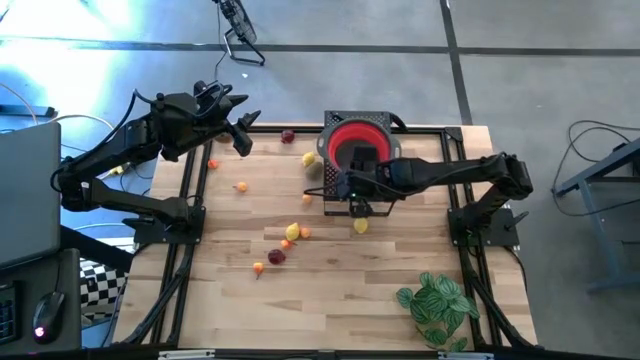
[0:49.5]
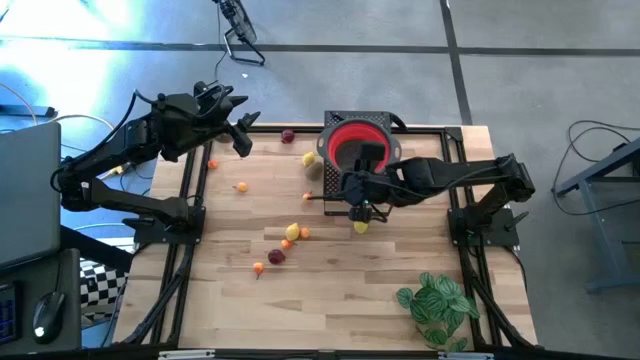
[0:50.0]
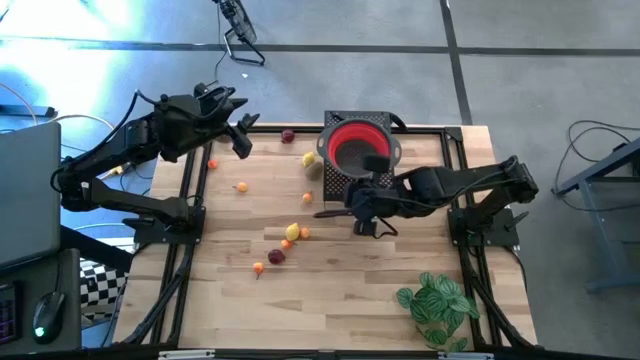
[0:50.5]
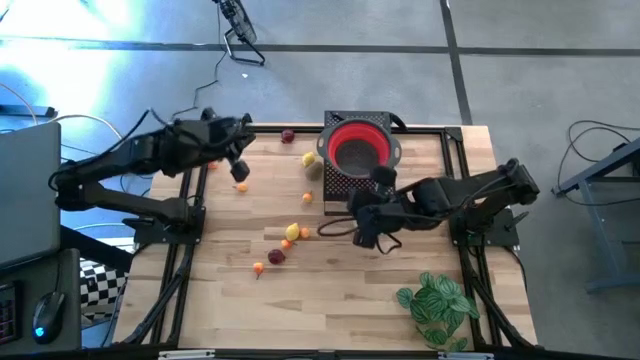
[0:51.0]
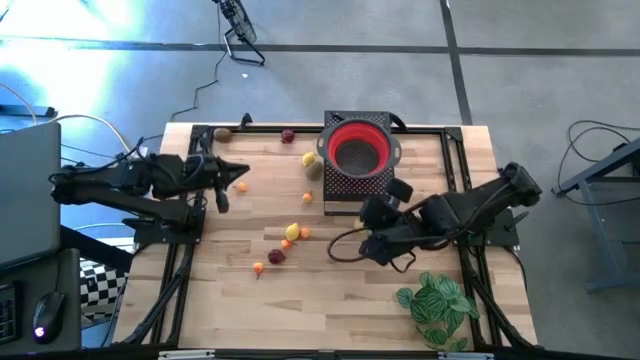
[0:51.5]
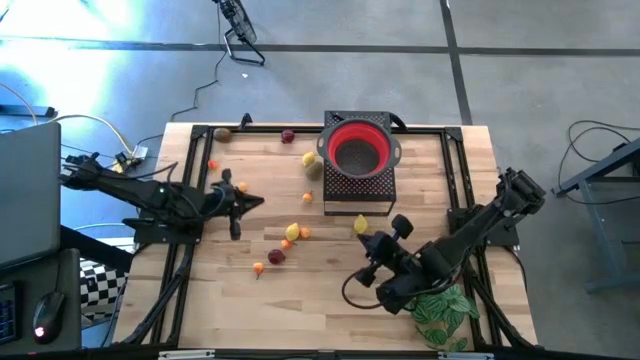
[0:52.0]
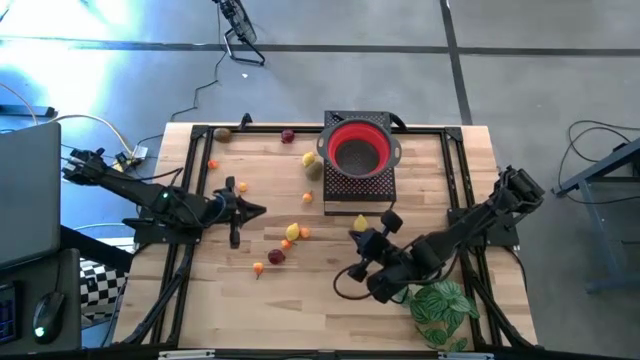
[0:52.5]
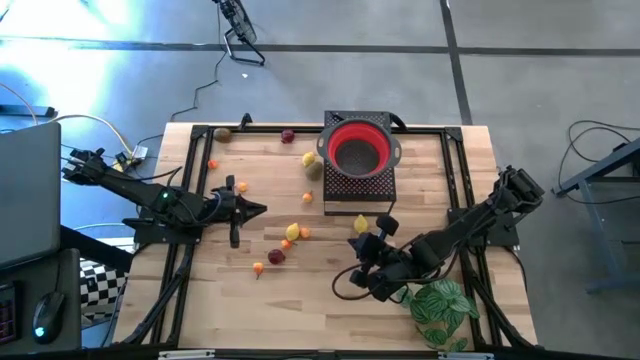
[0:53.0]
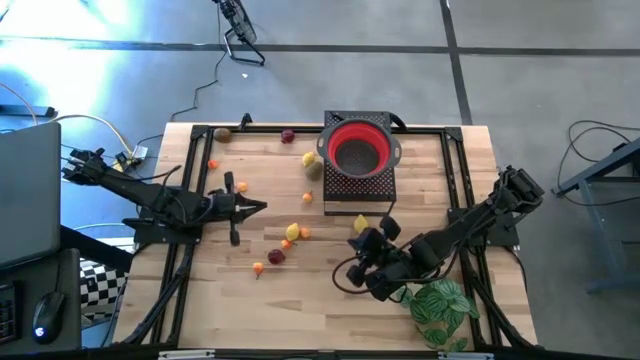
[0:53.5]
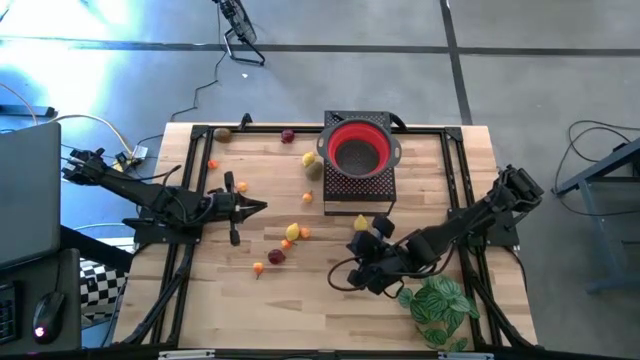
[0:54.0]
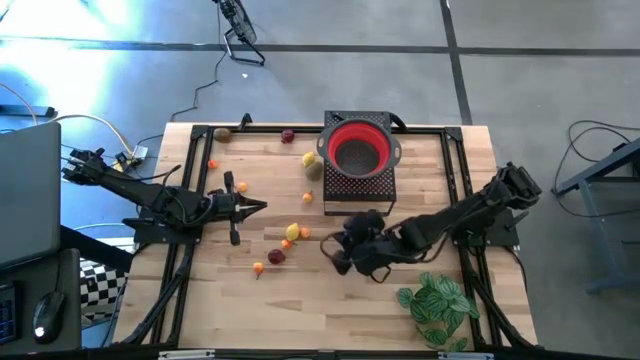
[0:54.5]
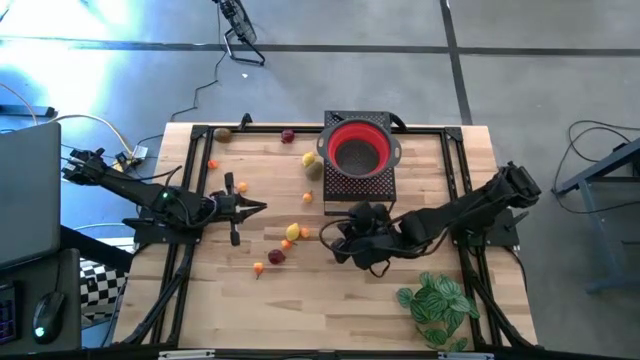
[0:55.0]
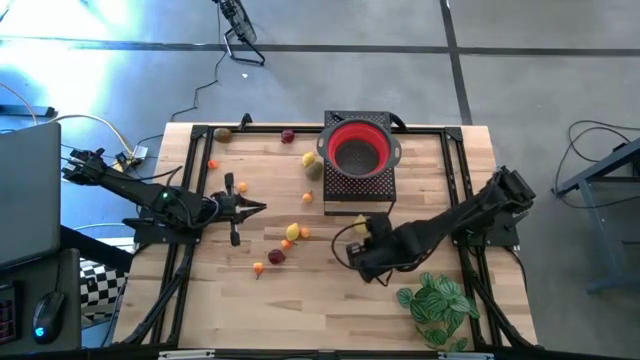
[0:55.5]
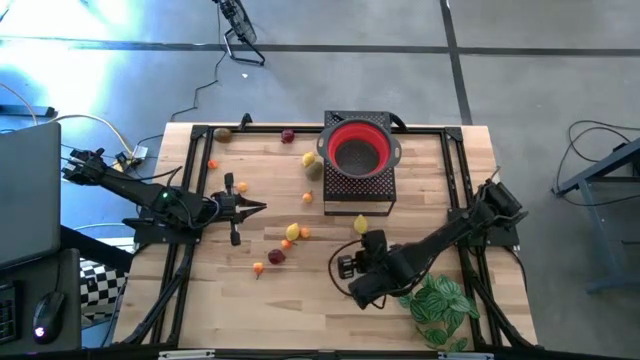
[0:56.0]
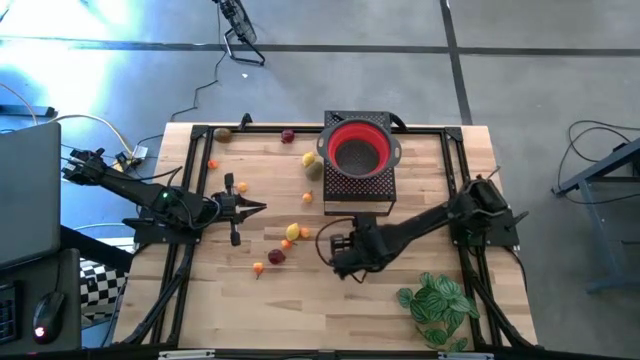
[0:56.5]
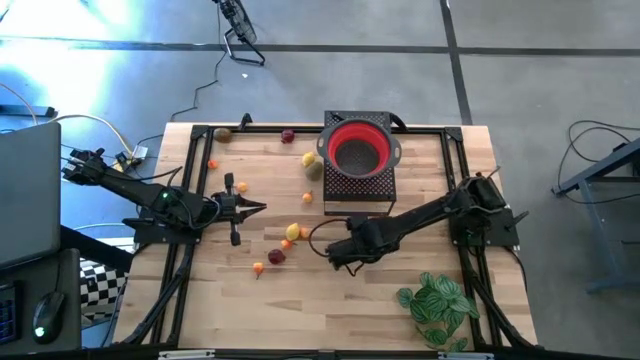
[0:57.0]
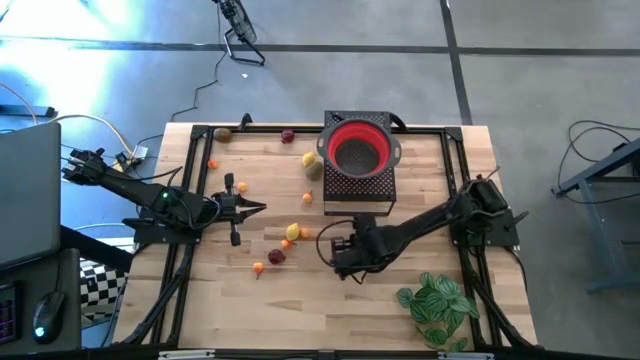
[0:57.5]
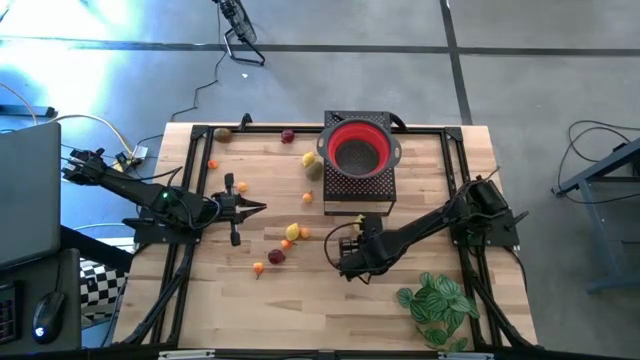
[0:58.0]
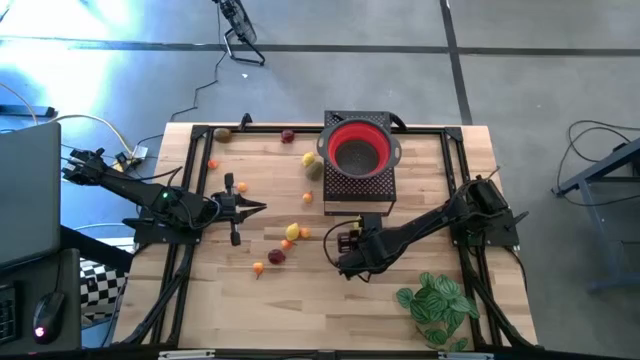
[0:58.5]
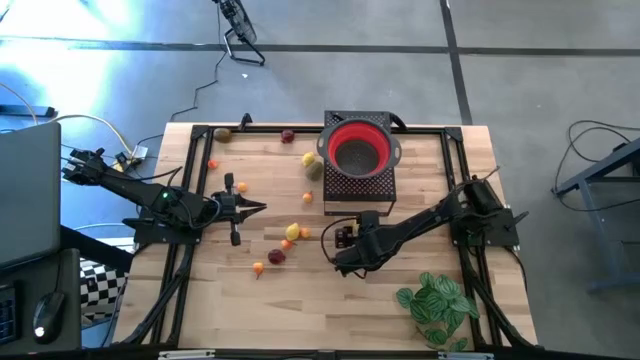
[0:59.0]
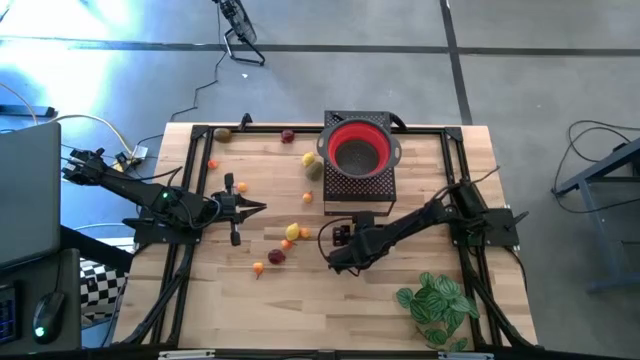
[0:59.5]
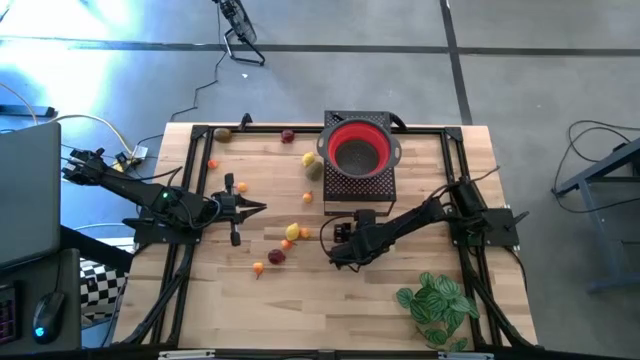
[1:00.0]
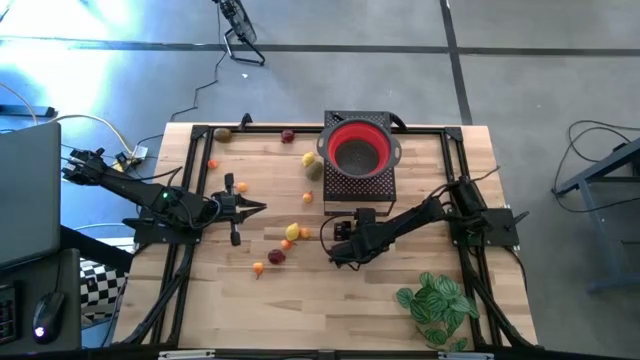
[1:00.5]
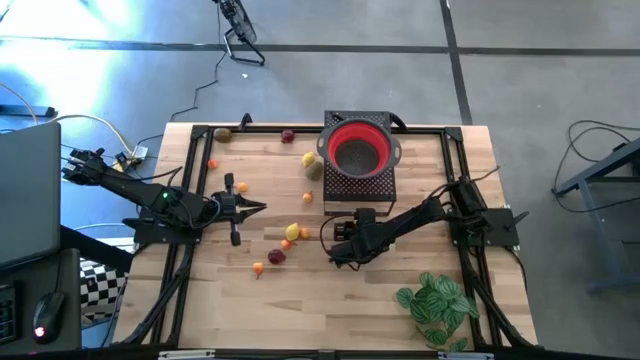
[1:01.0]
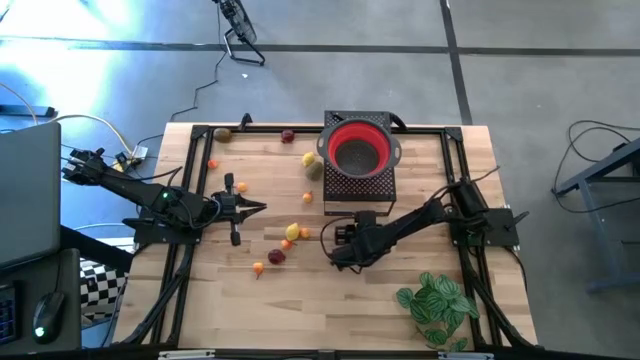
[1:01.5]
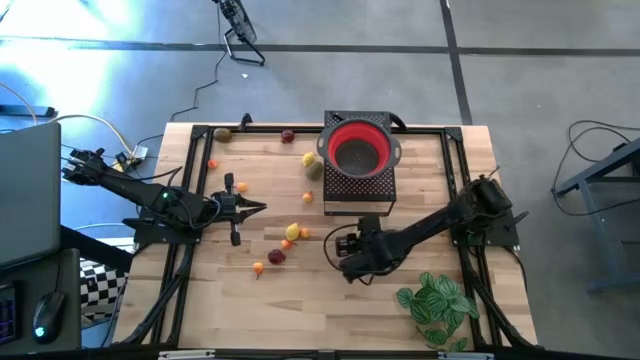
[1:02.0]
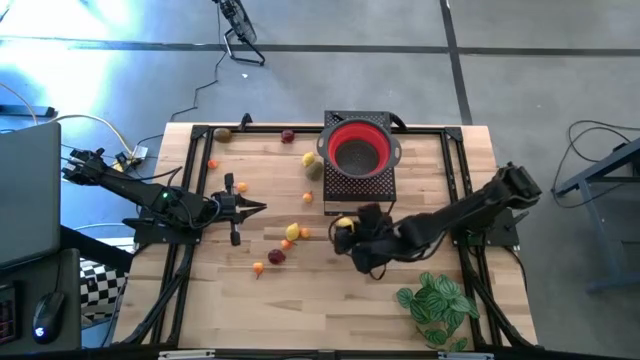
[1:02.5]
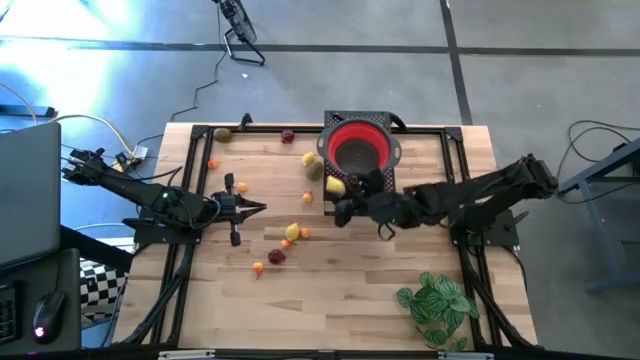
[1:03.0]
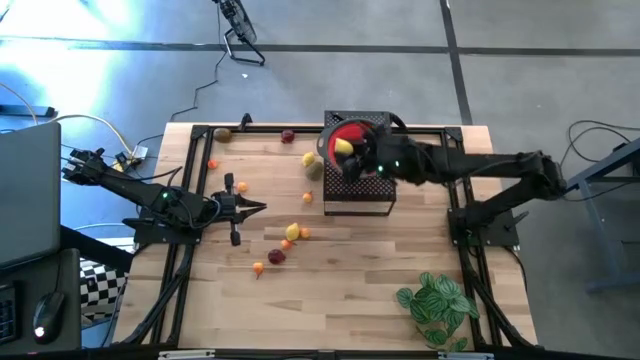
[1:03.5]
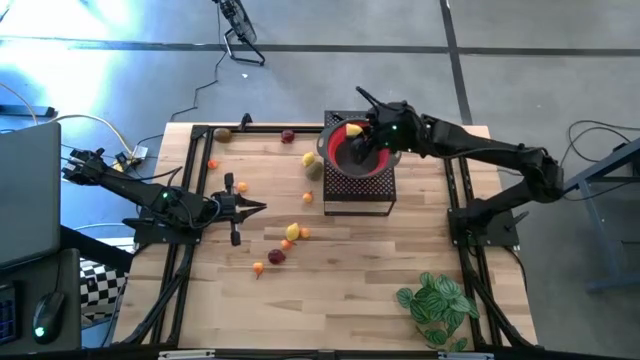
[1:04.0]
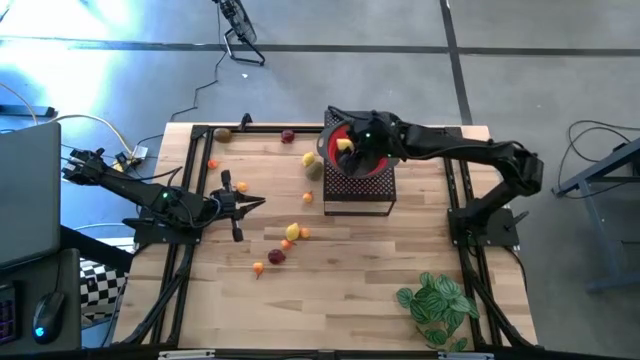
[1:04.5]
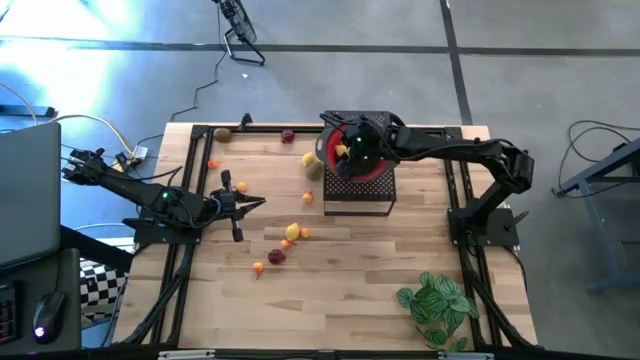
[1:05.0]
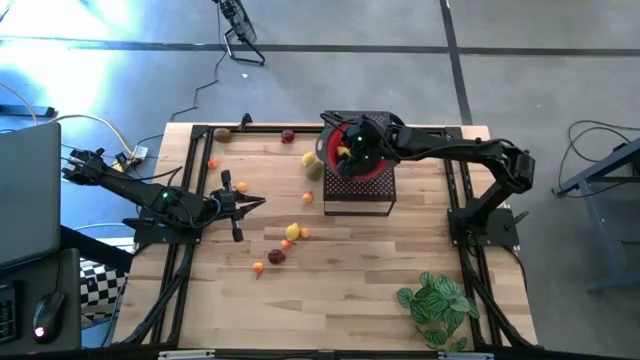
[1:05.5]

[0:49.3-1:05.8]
Task: Pick & Place Fruit
Put the bottom right yellow lemon into the red strainer bowl on the shelf

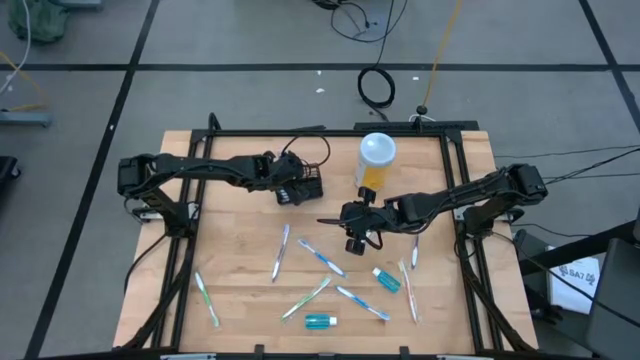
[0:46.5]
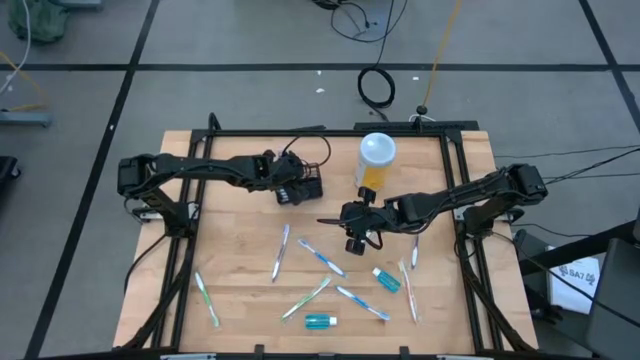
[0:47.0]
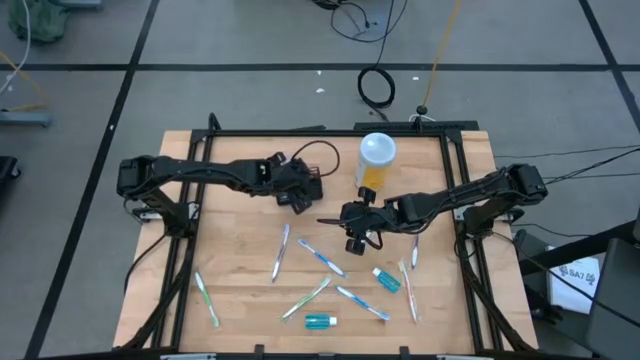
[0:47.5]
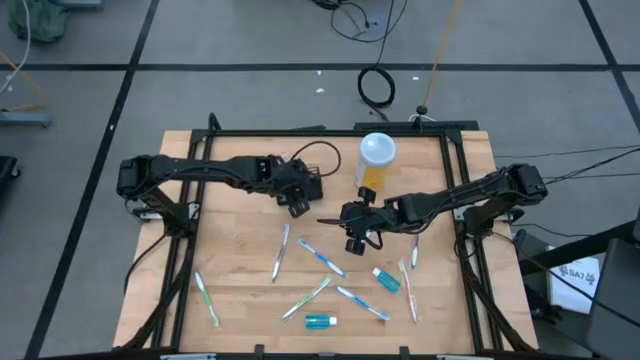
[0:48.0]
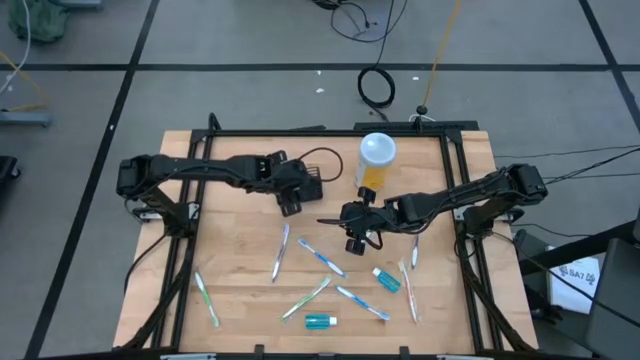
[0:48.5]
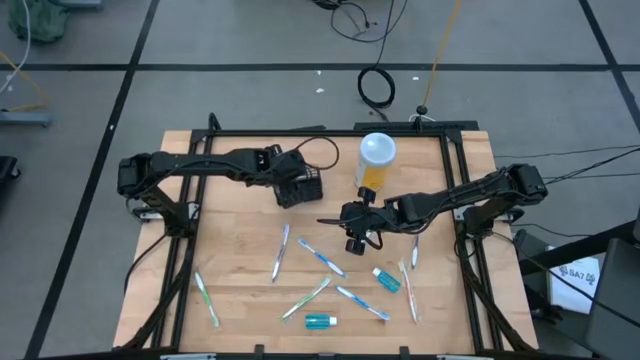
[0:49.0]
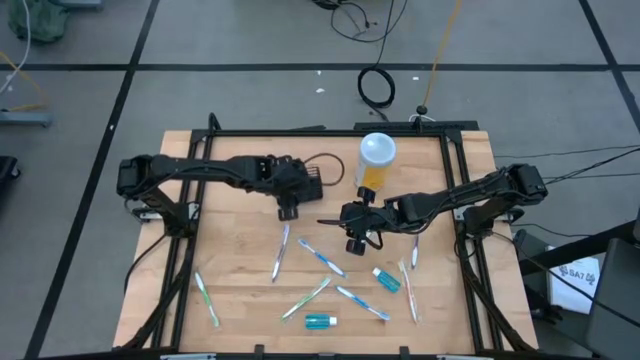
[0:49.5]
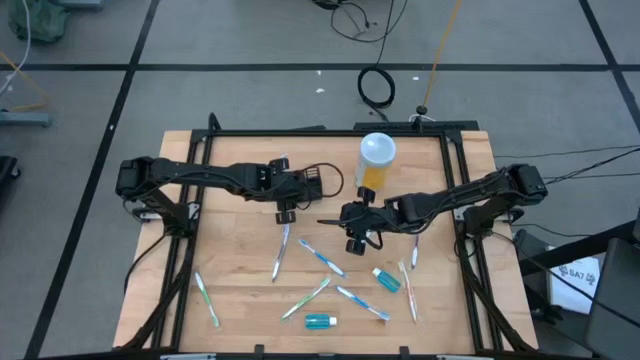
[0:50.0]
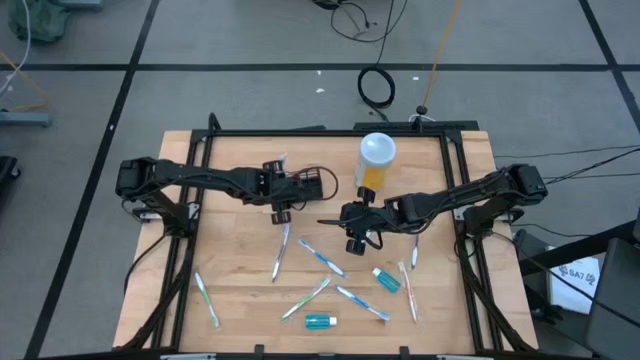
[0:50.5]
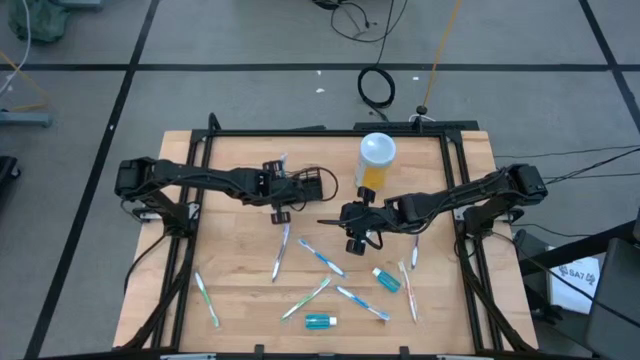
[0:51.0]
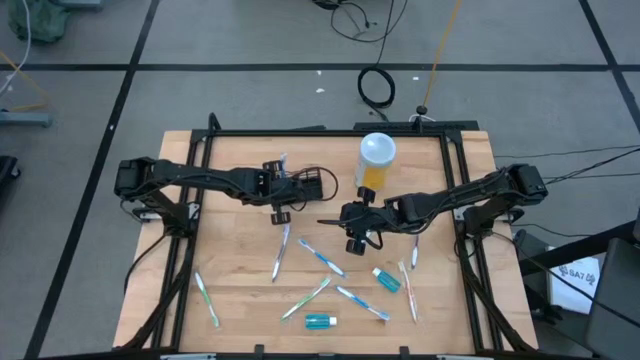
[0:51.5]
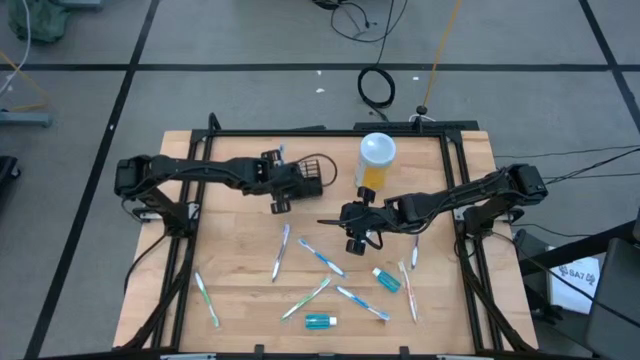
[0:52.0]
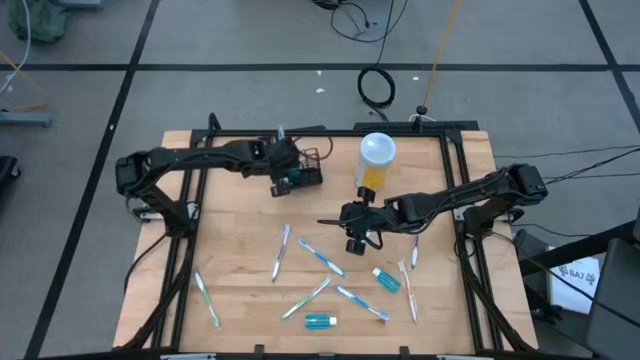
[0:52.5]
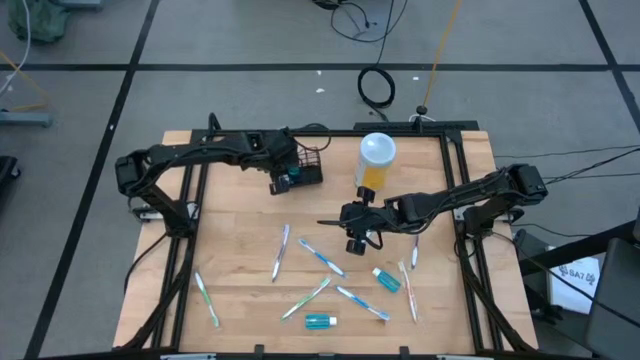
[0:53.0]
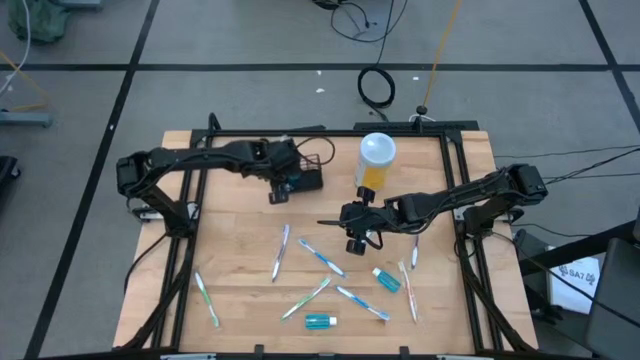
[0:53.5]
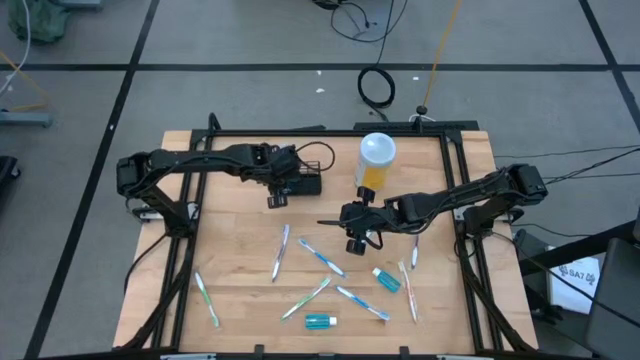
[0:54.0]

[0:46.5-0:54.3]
Task: Pick & Place toothbrushing station
Adjust the black mesh organizer
